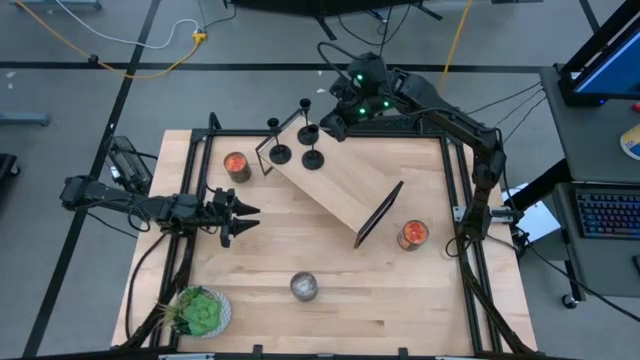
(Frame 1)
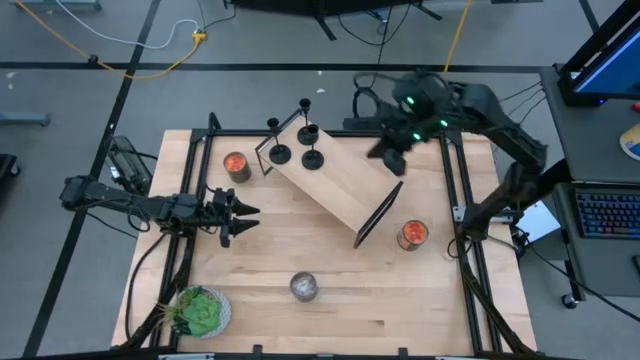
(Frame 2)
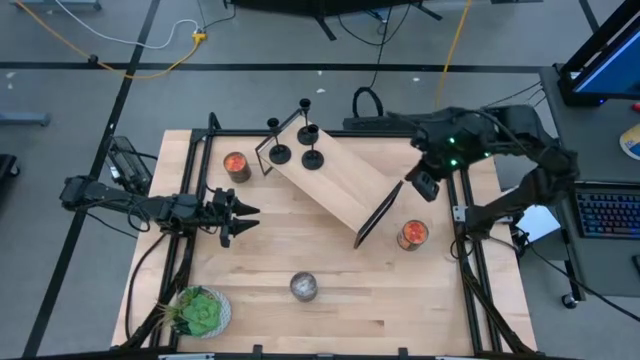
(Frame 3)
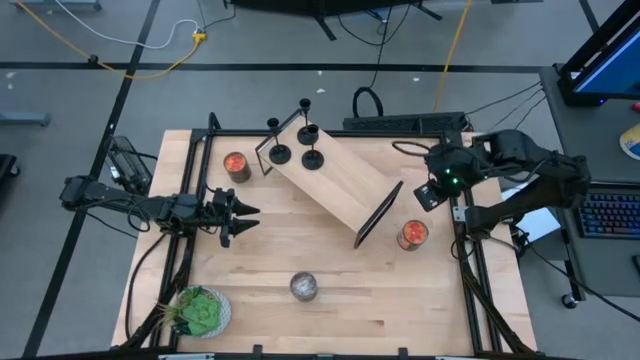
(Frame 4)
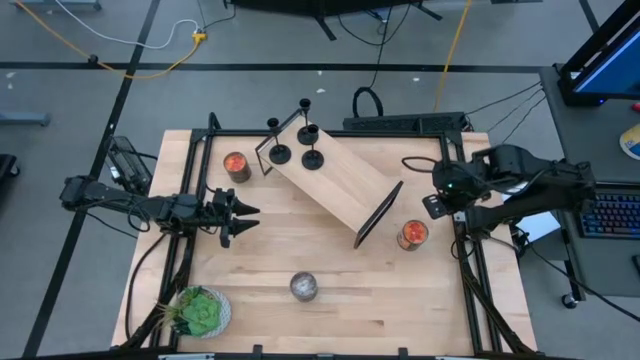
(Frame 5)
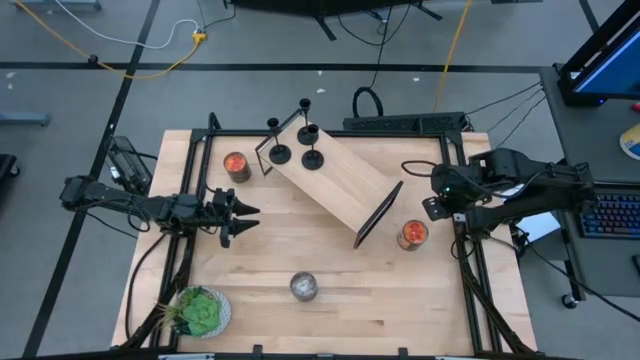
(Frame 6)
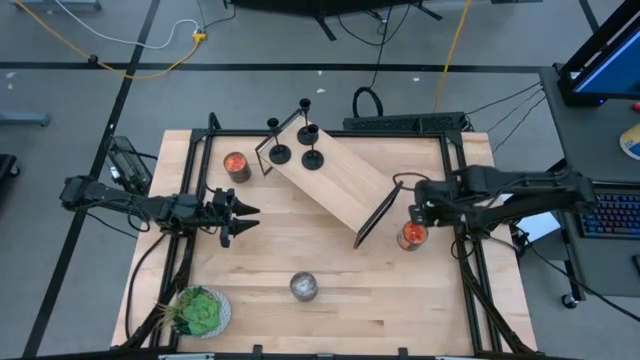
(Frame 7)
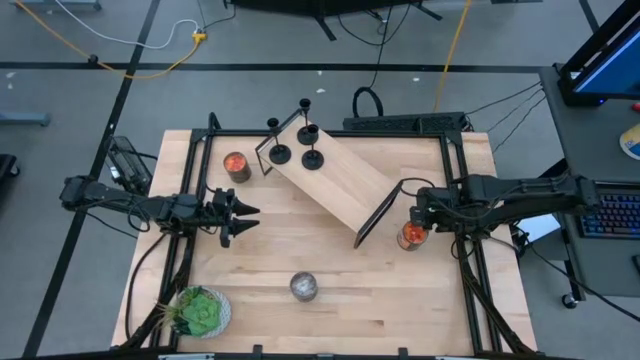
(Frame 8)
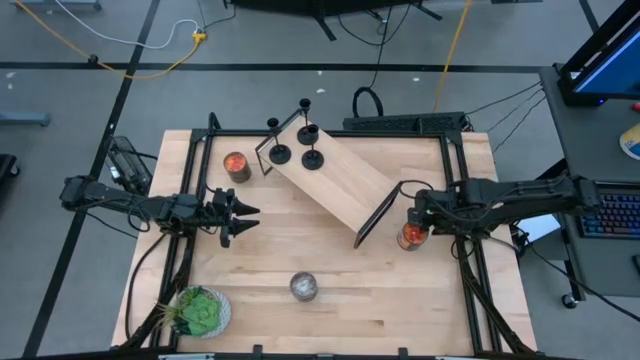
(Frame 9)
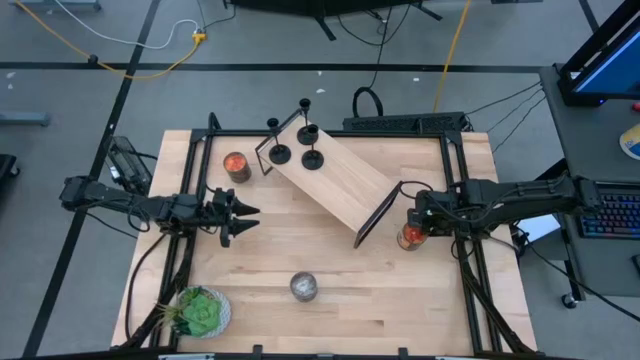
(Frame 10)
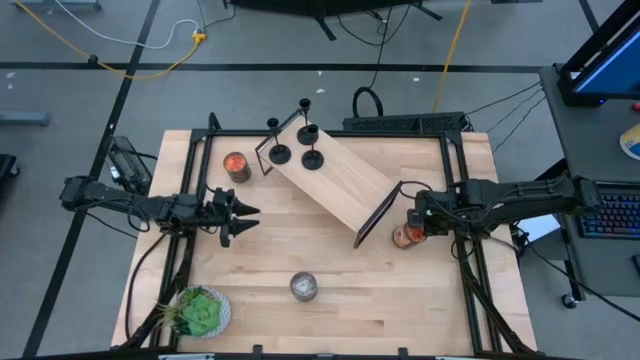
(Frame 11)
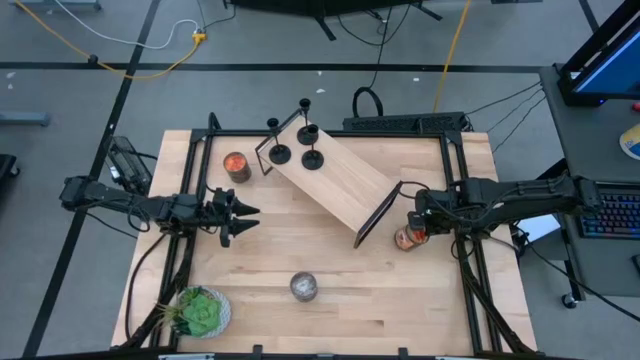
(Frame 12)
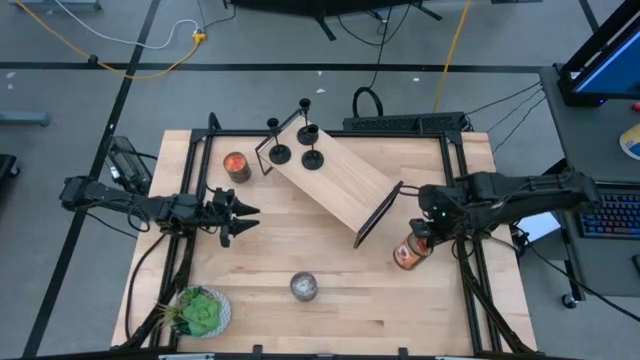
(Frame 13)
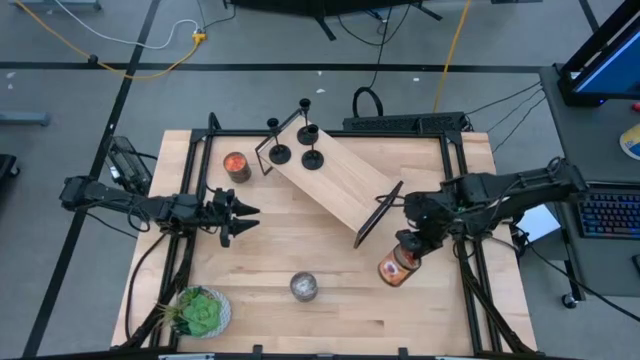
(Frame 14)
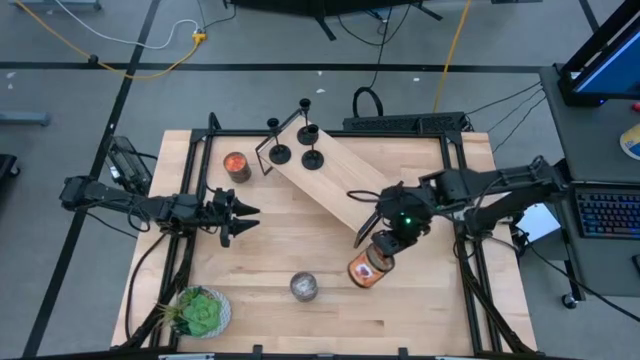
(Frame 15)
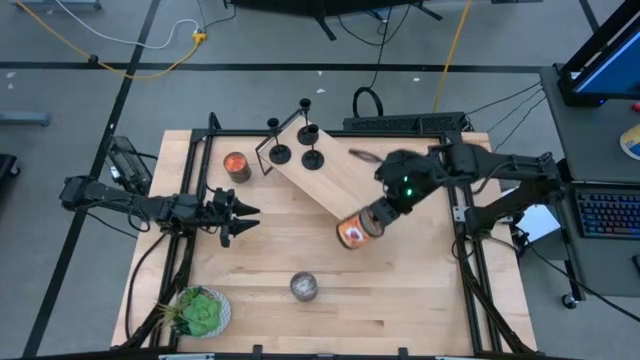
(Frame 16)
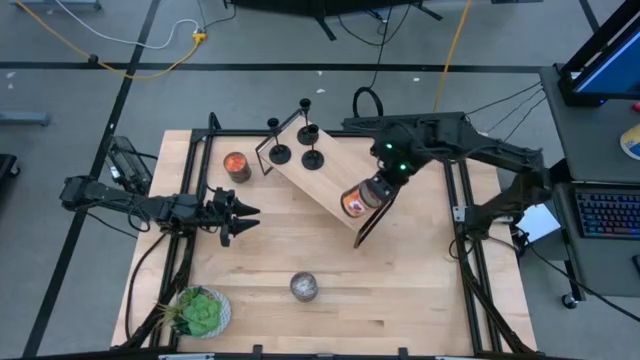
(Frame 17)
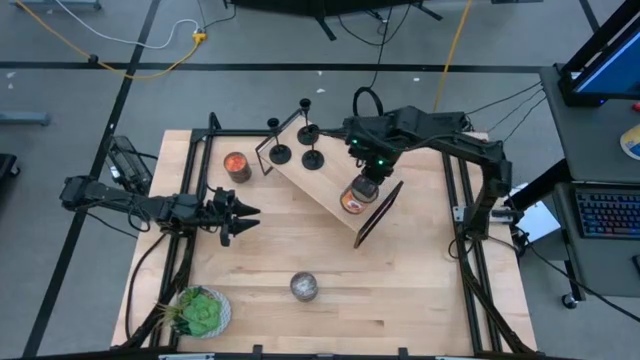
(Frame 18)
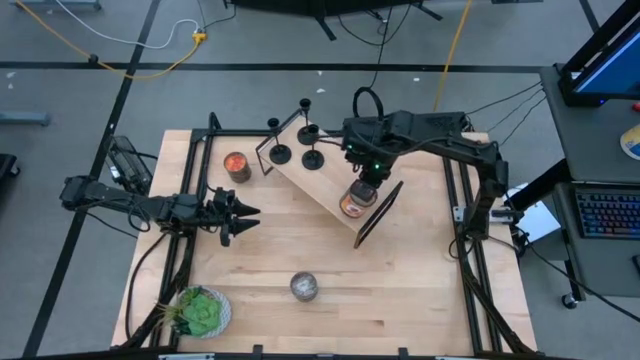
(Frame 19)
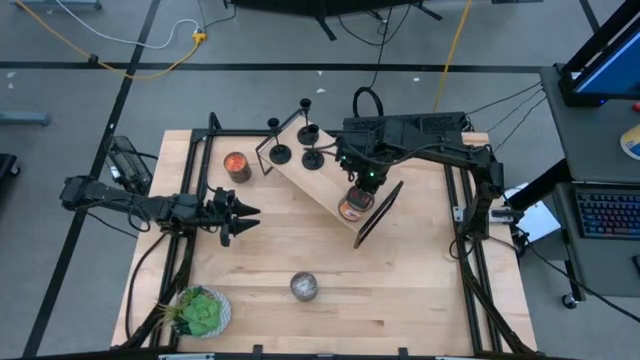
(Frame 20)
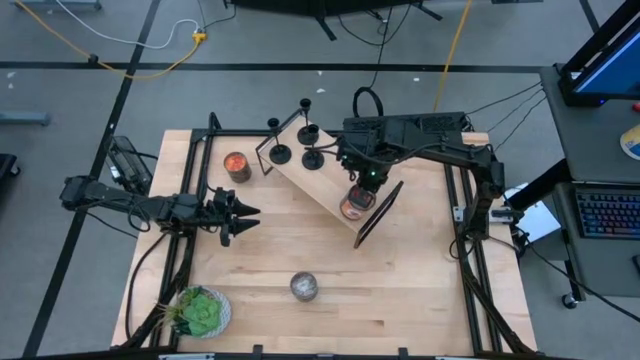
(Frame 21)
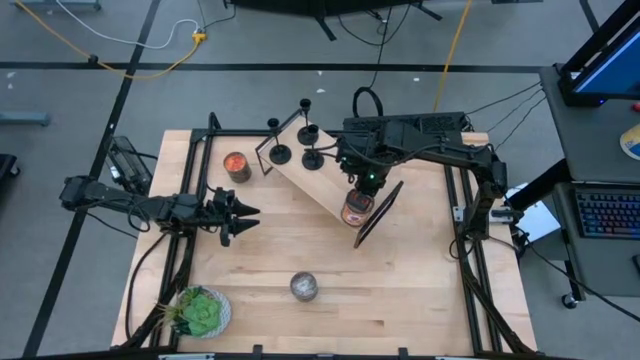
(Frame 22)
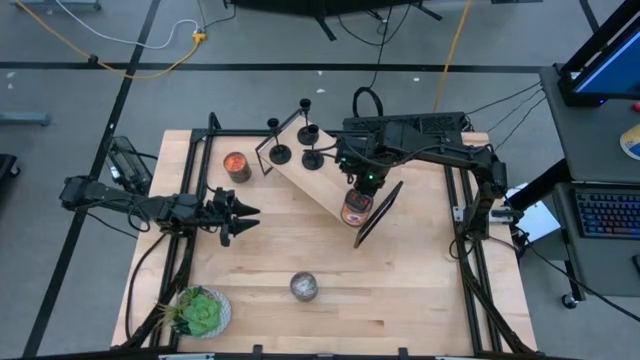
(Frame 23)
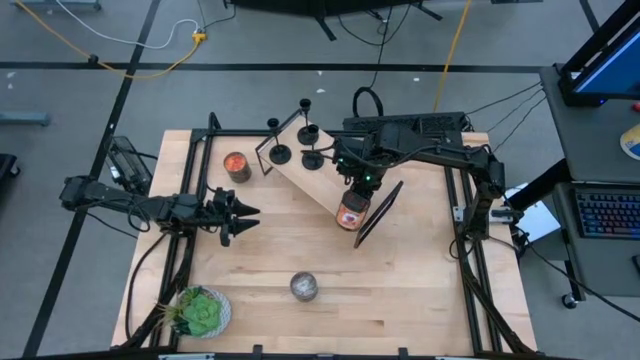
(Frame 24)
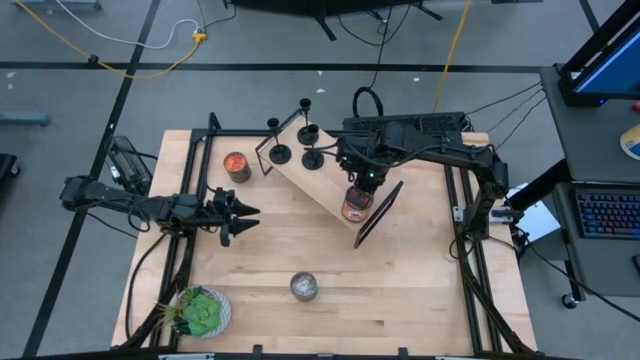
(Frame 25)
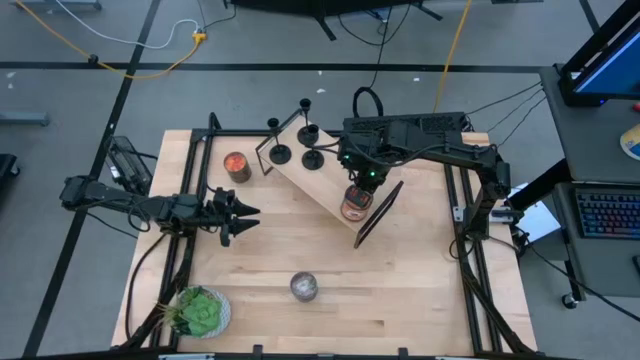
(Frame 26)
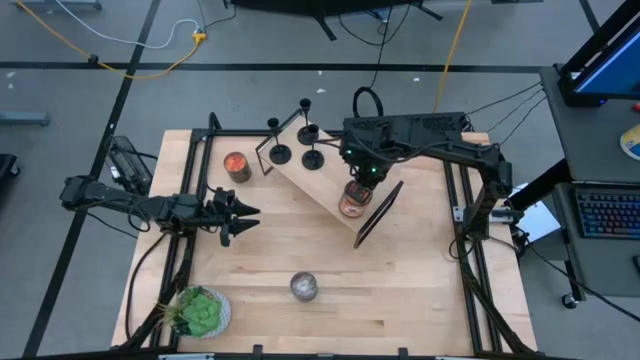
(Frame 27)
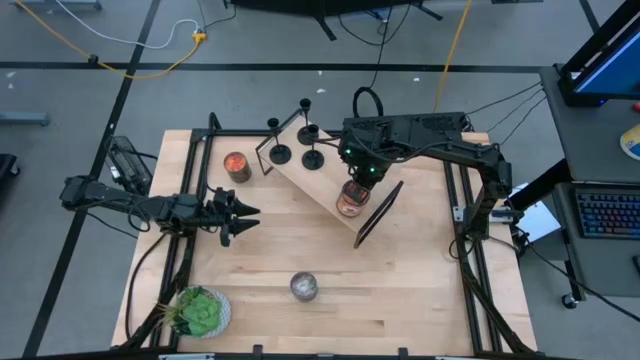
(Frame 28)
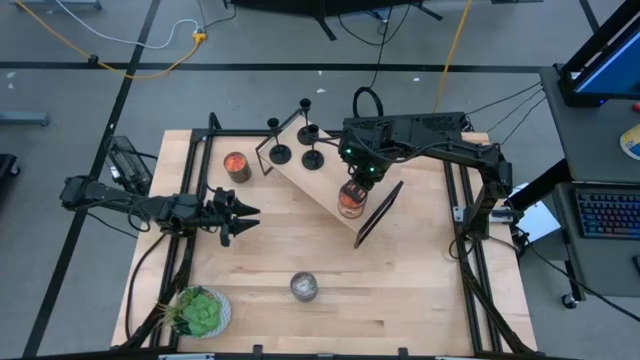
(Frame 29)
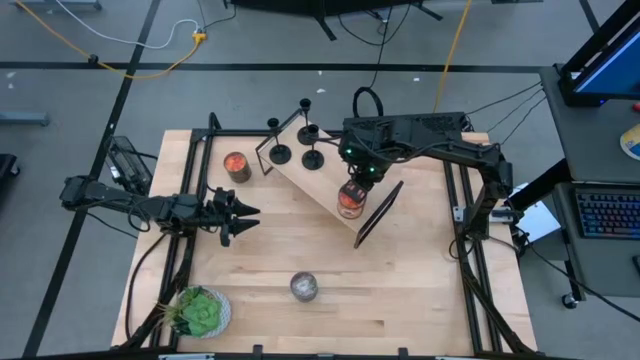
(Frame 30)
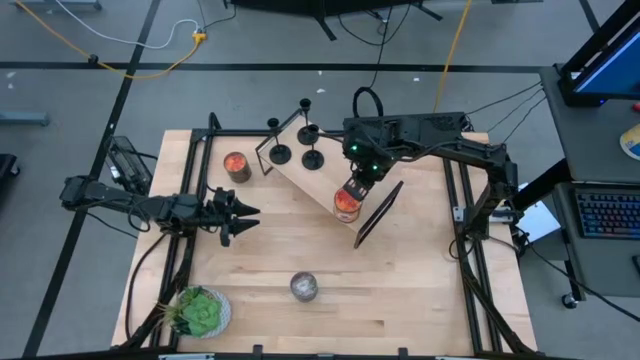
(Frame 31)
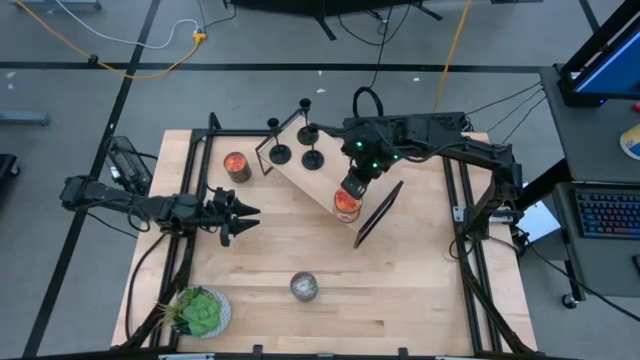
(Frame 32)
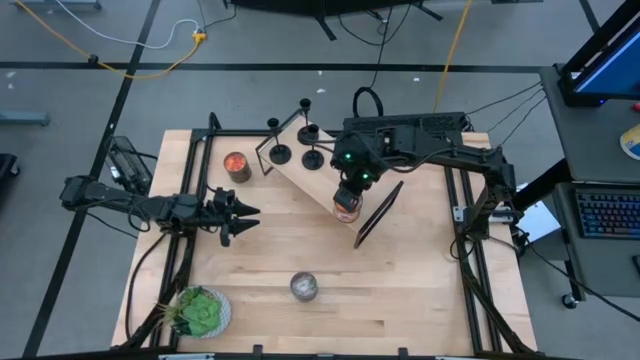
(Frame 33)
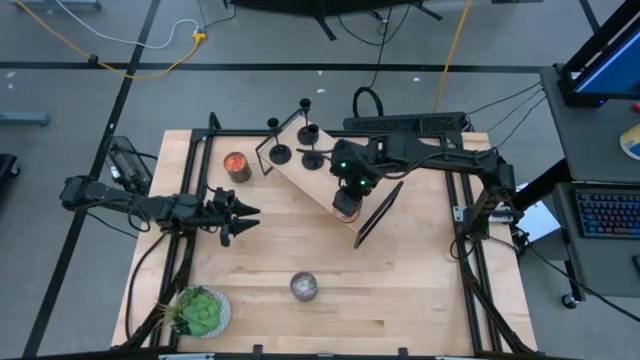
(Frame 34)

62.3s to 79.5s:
Task: Pick & Place candle stick holders
Put the bottom orange scented candle on the shelf

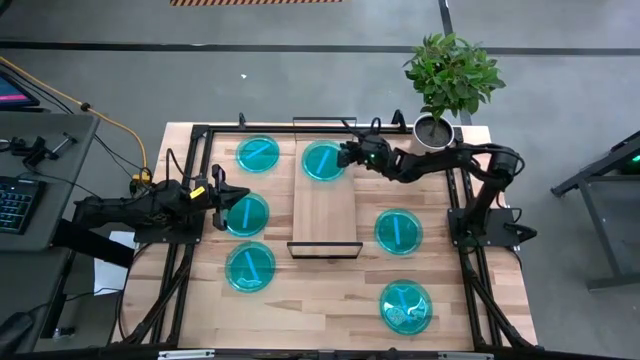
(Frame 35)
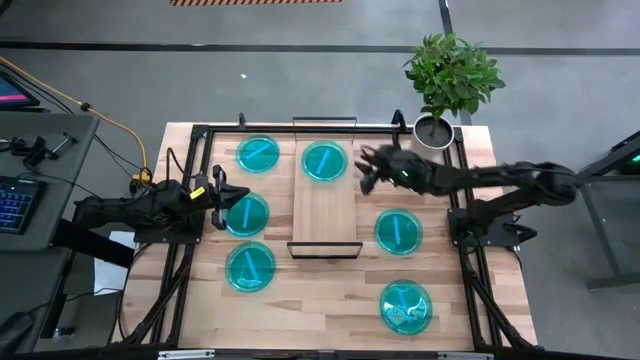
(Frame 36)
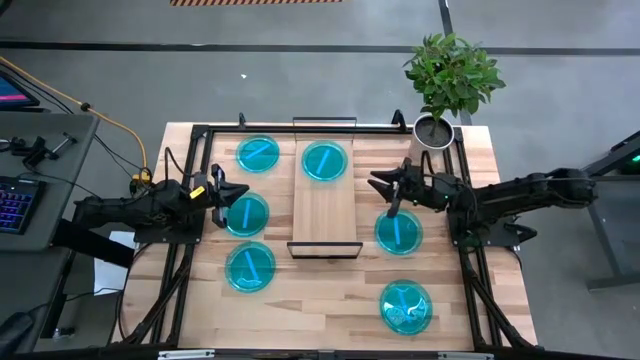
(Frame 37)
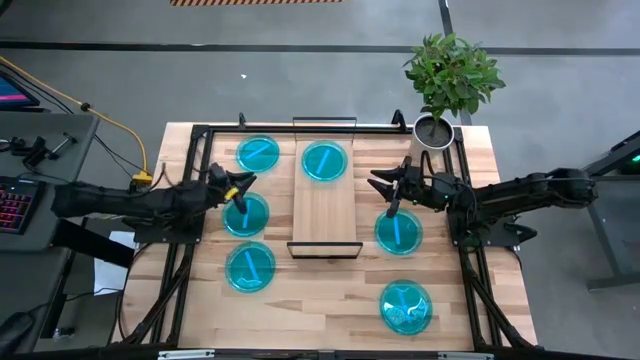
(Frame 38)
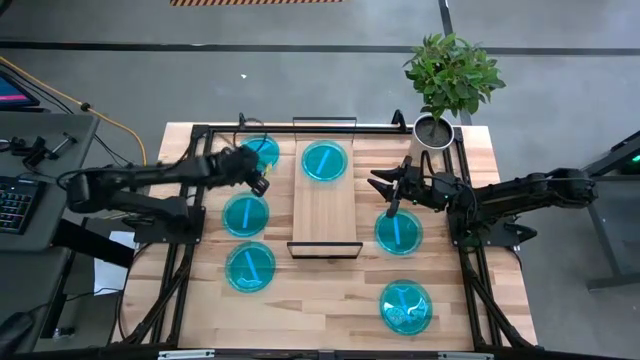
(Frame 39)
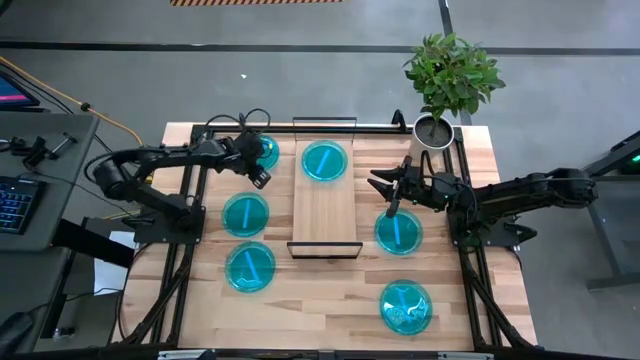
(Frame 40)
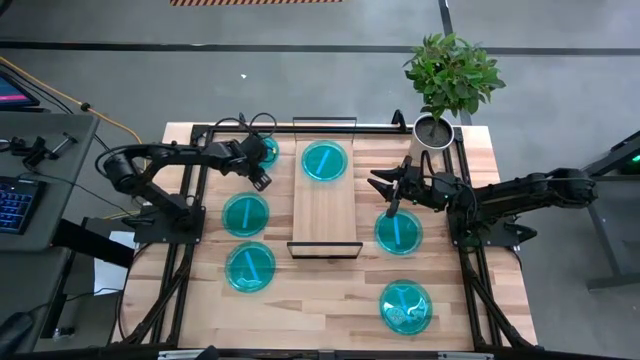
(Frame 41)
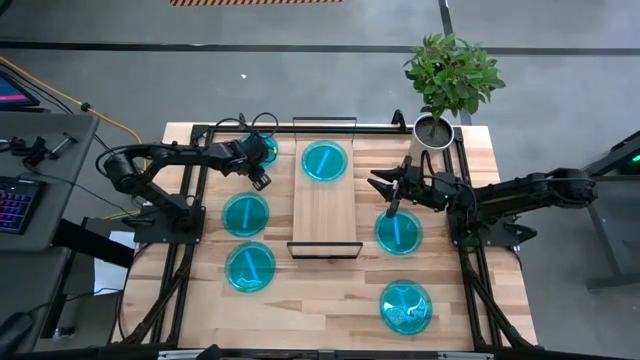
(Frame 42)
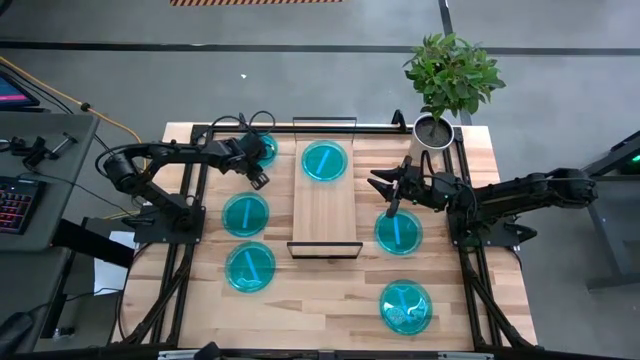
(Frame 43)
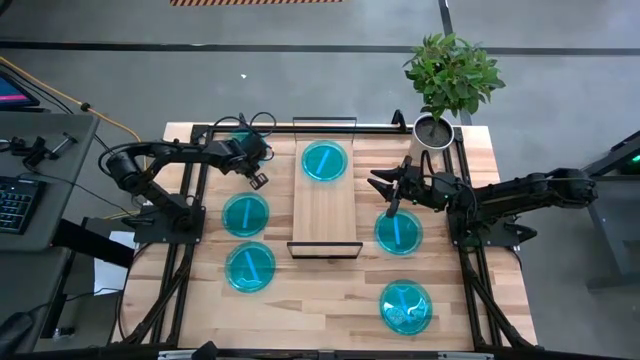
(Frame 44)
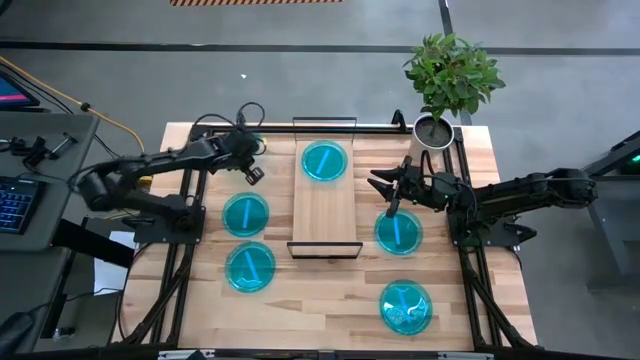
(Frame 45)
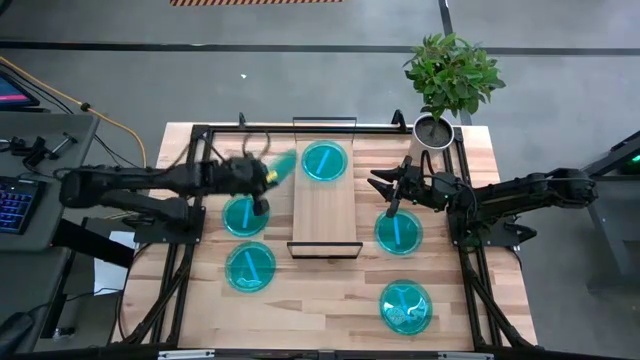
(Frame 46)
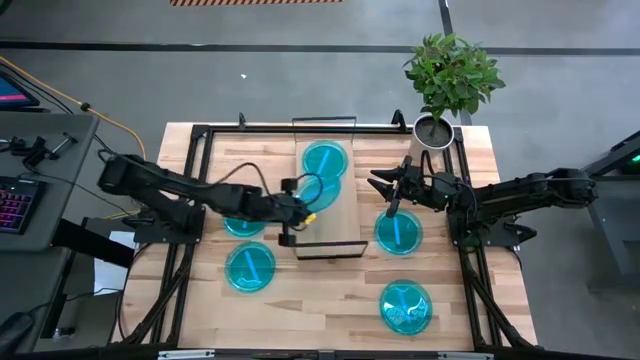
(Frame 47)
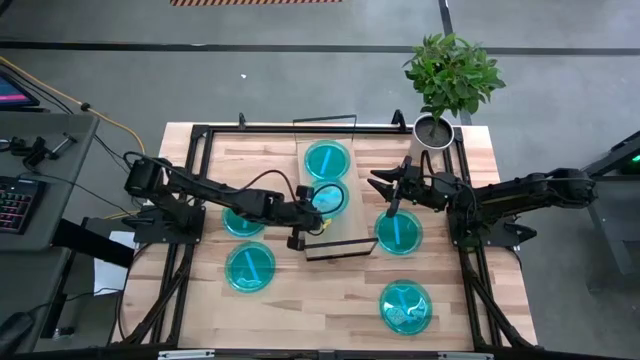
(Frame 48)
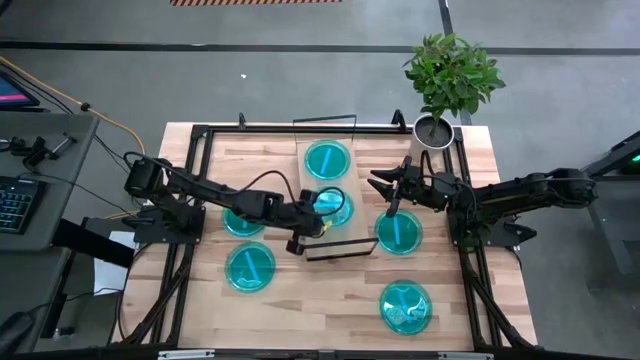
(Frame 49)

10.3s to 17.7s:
Task: Place and stack plates onto a shelf
Put the blue plate on the shelf
